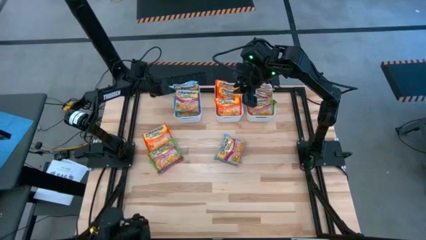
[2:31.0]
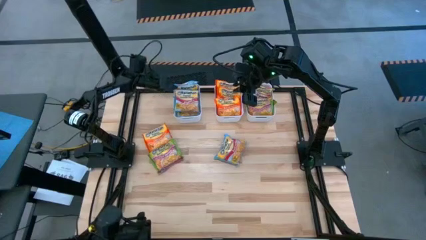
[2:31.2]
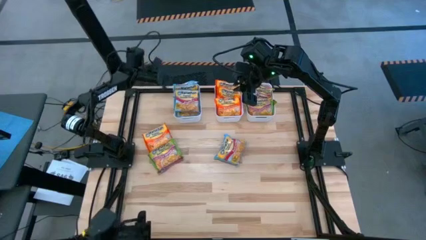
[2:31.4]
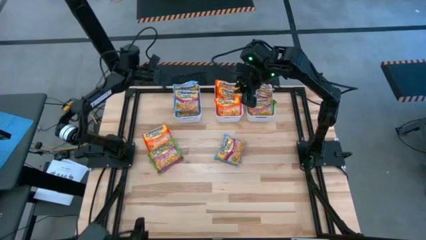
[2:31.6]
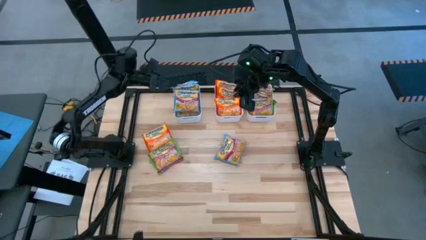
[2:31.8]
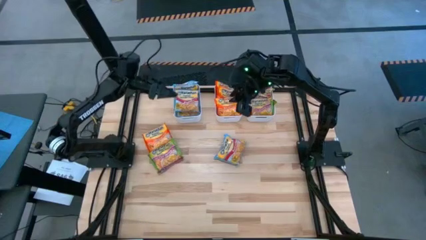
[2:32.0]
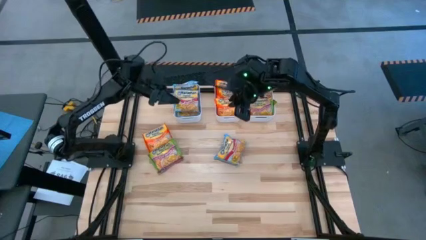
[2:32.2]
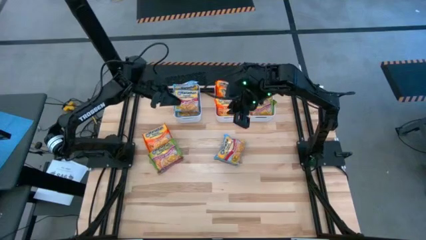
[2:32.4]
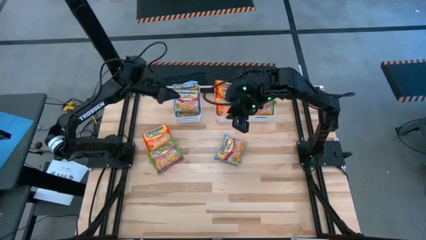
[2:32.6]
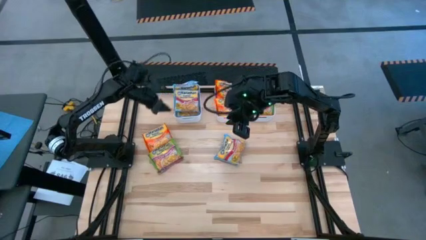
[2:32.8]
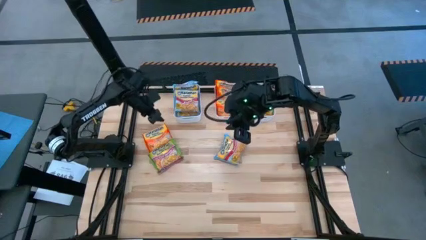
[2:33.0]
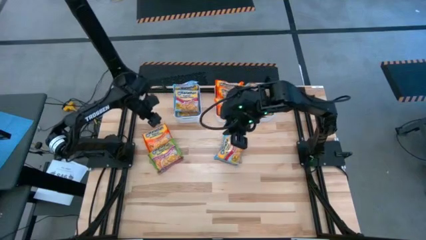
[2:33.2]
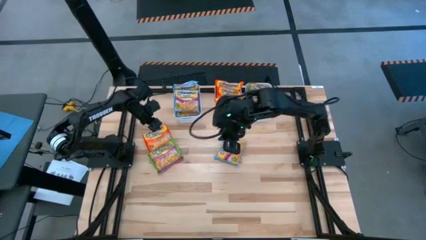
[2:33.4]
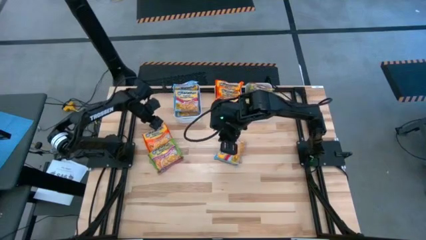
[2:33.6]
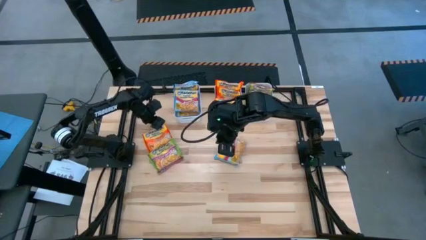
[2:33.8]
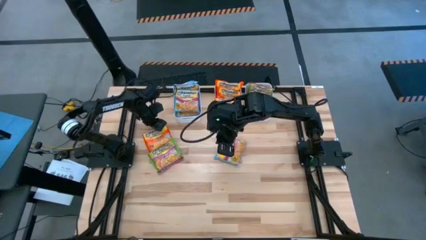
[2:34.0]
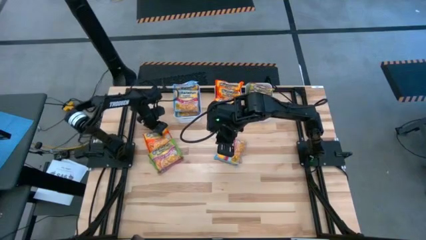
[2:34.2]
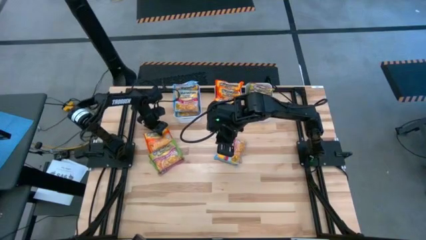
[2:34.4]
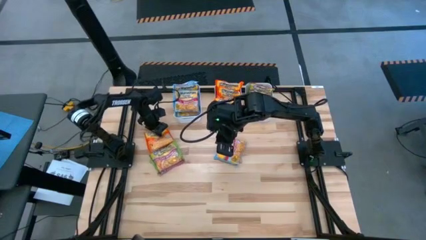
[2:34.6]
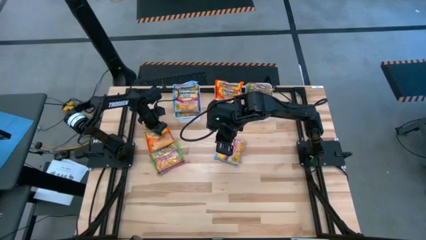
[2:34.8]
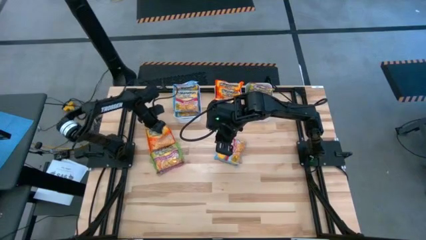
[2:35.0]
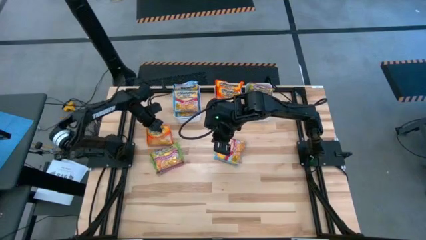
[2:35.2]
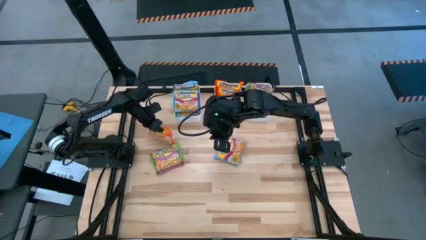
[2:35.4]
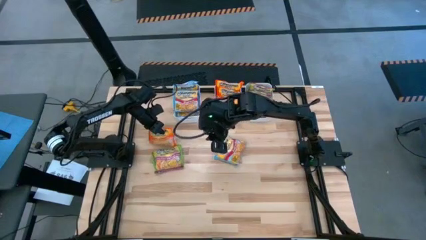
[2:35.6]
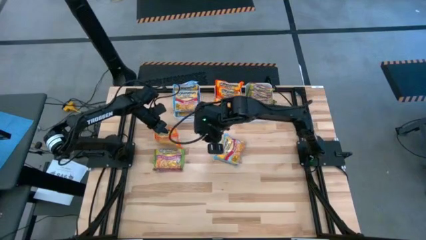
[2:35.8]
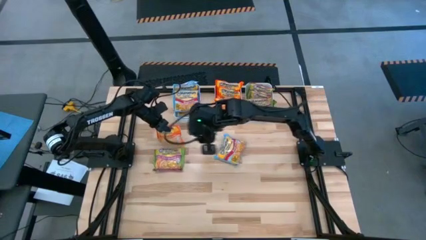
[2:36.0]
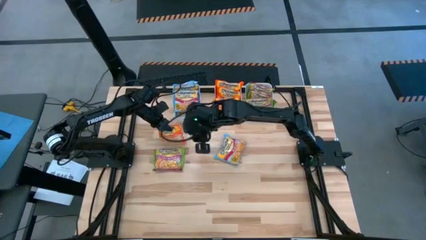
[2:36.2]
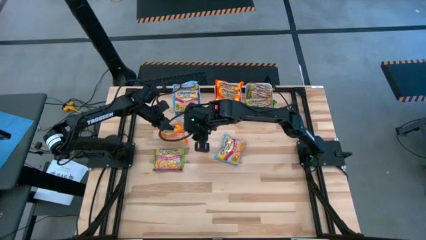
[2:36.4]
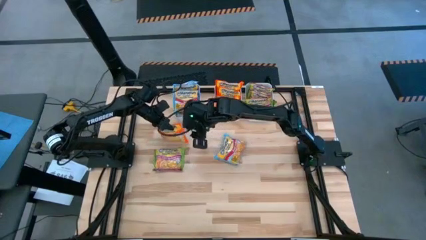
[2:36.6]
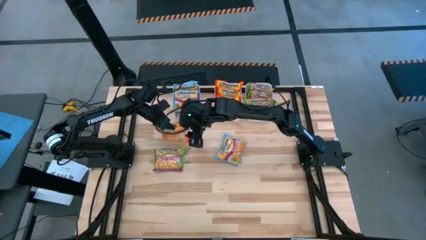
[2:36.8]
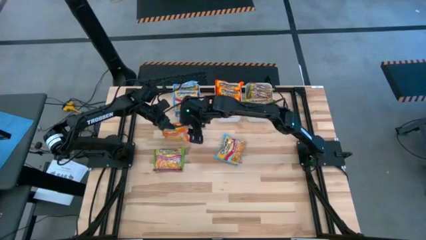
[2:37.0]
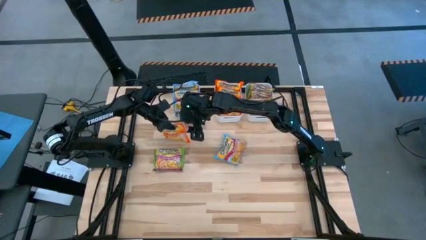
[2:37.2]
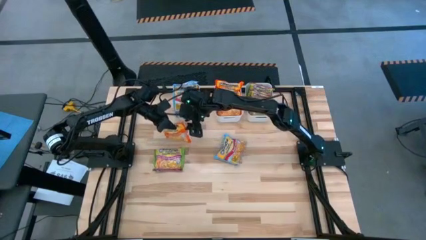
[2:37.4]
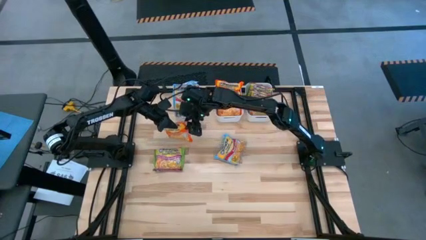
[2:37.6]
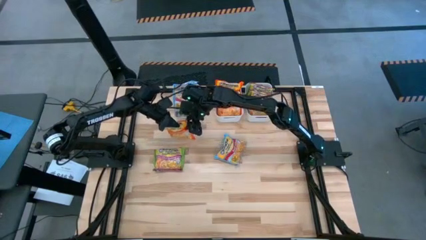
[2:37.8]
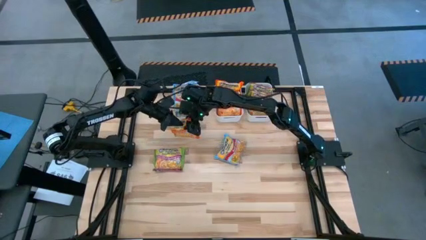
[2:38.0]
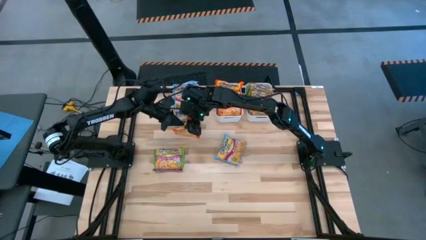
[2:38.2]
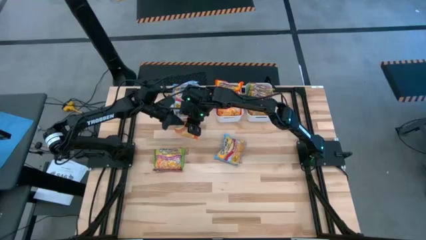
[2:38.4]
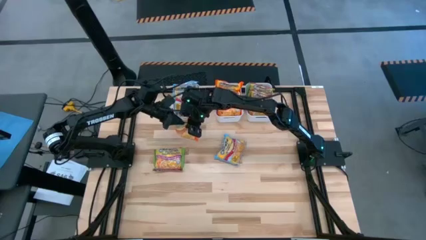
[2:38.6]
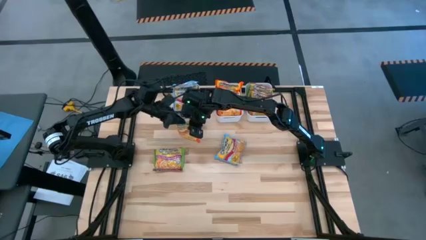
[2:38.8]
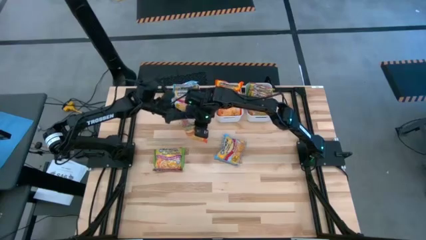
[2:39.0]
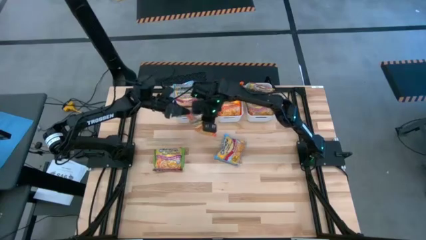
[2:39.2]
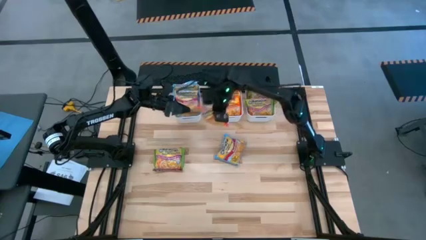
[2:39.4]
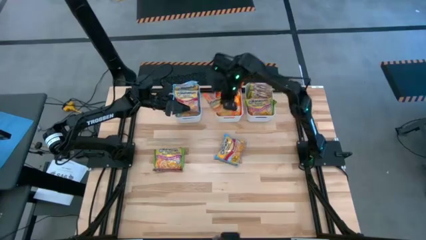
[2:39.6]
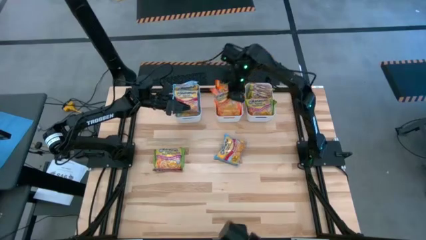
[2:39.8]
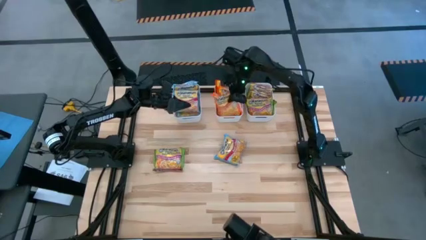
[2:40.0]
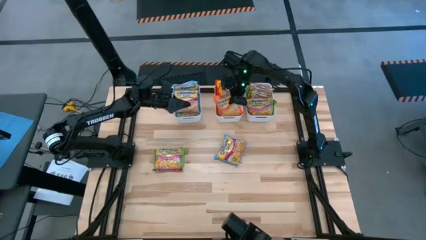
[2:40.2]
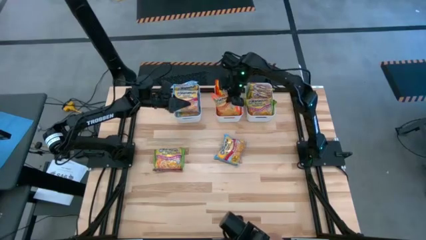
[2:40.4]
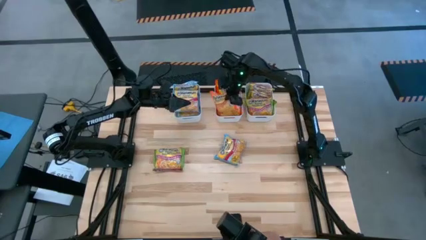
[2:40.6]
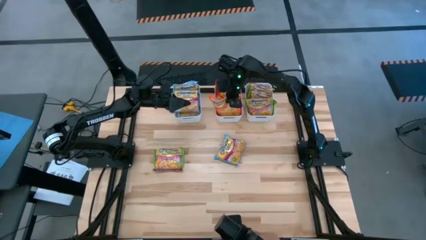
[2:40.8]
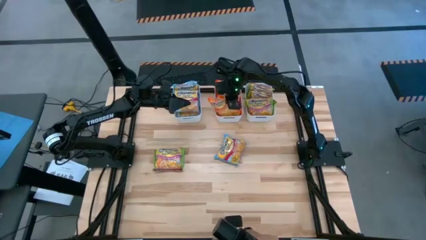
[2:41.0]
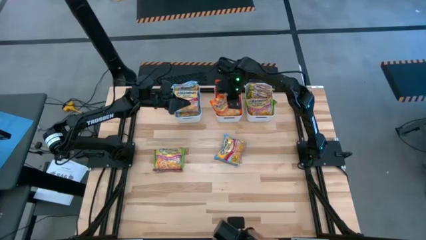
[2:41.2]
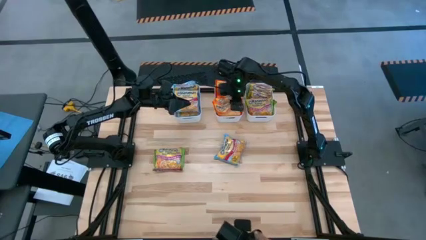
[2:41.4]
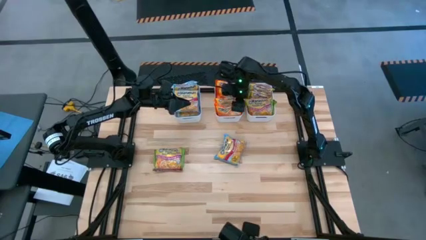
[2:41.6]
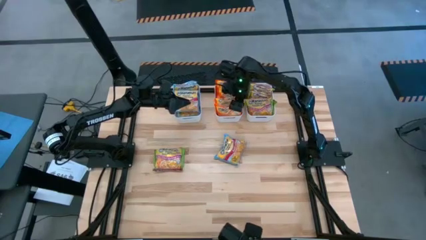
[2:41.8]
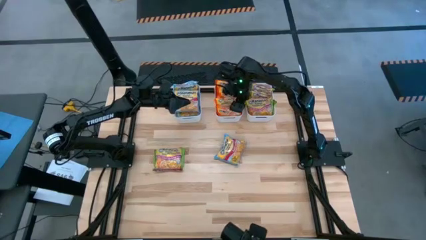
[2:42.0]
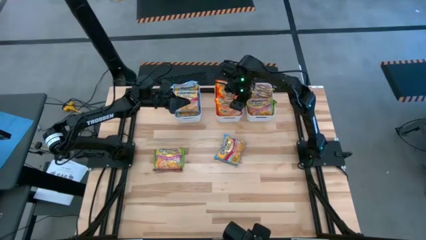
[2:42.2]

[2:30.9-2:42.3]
Task: Sort Maruchan noodles
Put the orange noodle pack into the middle white bin
